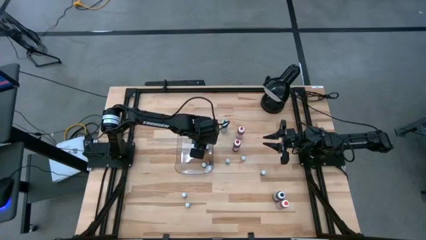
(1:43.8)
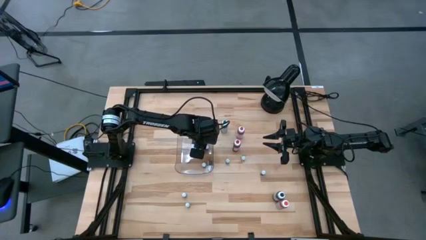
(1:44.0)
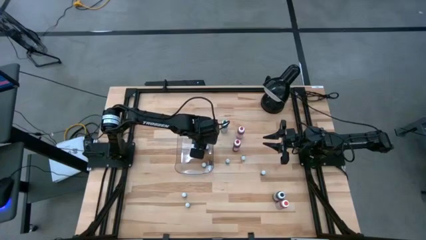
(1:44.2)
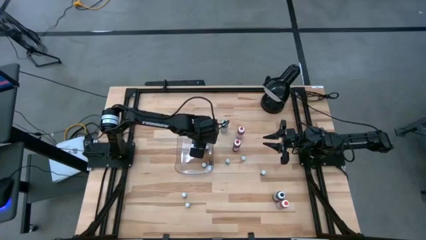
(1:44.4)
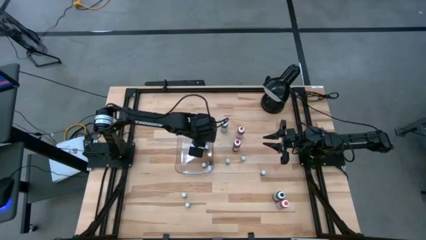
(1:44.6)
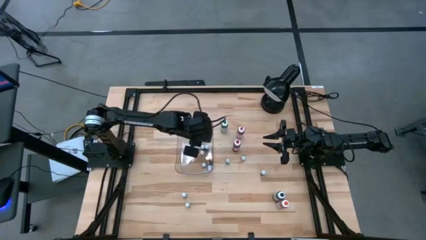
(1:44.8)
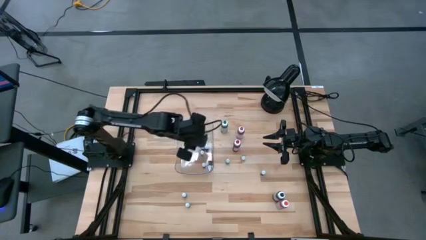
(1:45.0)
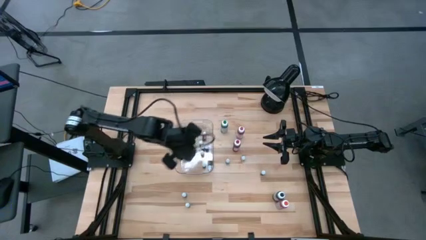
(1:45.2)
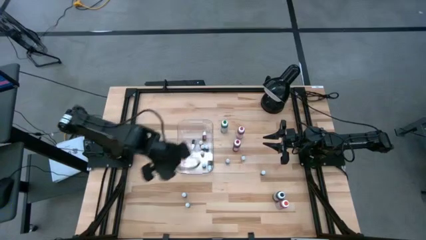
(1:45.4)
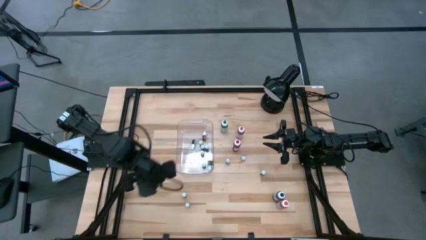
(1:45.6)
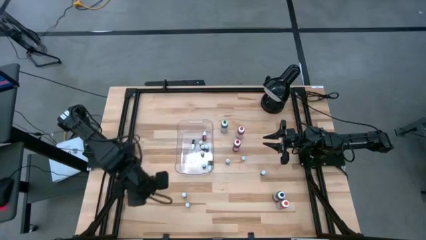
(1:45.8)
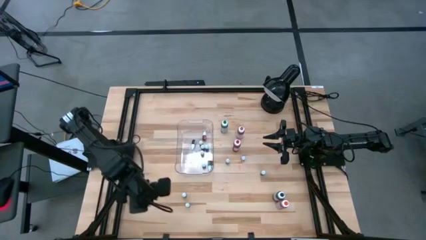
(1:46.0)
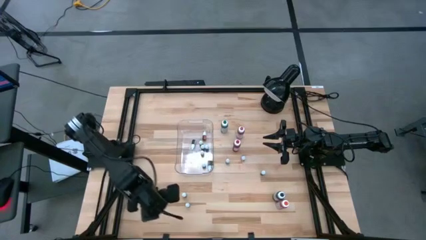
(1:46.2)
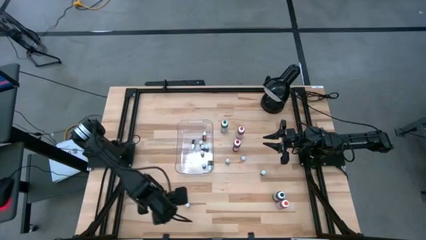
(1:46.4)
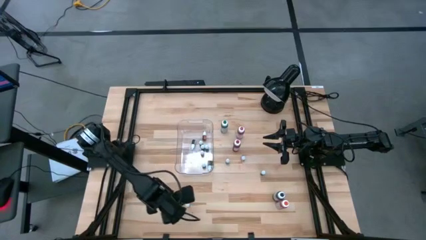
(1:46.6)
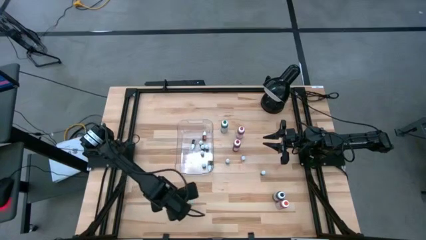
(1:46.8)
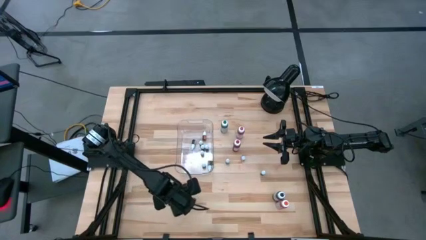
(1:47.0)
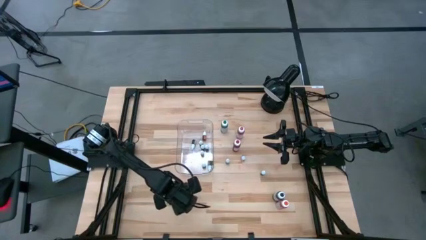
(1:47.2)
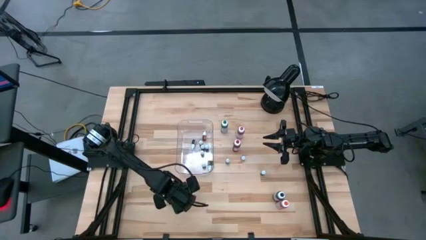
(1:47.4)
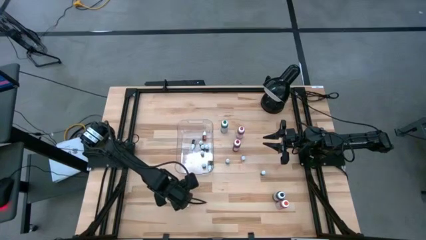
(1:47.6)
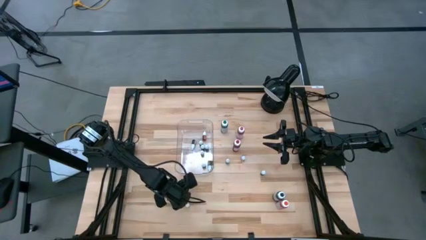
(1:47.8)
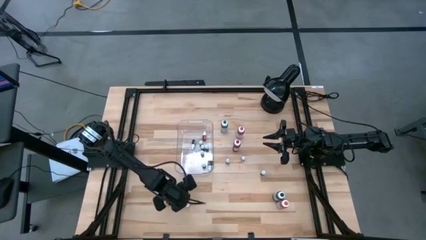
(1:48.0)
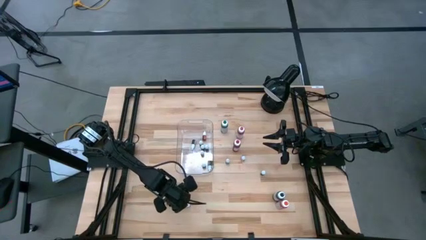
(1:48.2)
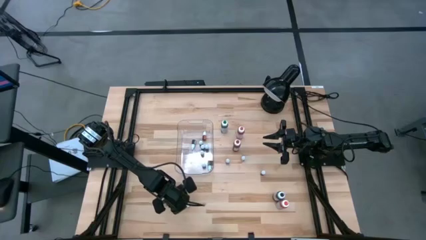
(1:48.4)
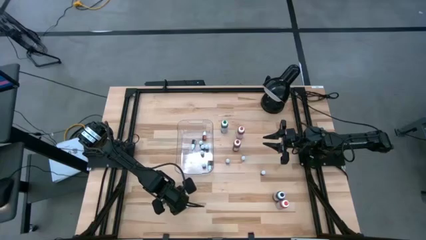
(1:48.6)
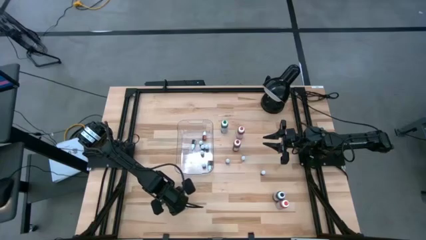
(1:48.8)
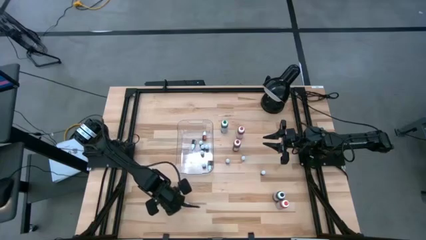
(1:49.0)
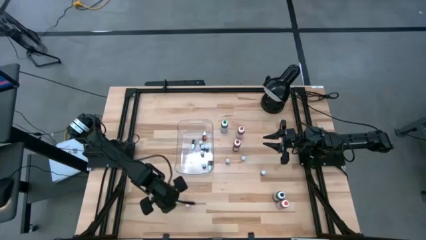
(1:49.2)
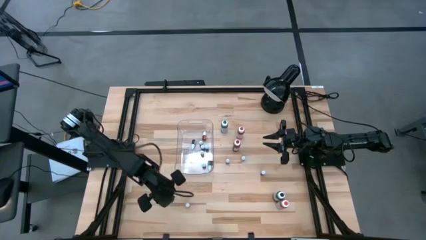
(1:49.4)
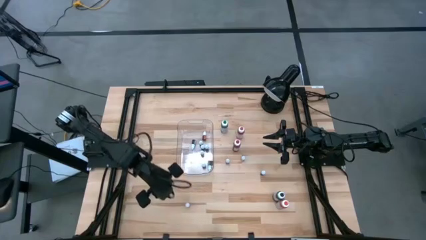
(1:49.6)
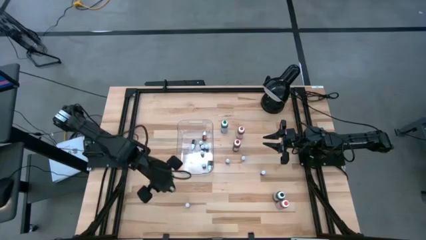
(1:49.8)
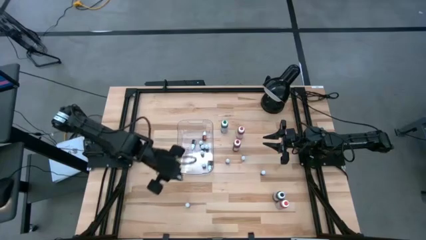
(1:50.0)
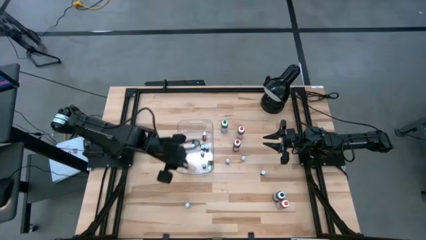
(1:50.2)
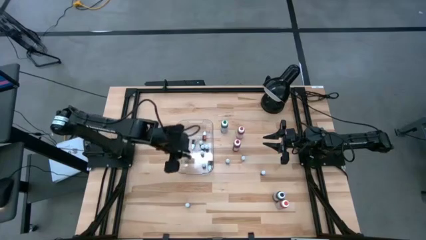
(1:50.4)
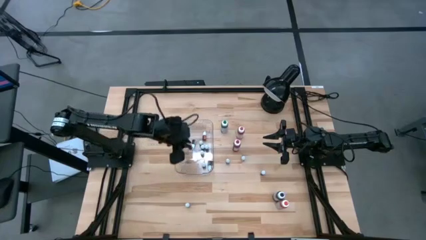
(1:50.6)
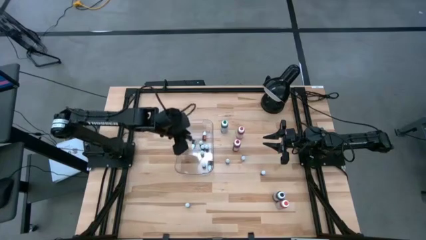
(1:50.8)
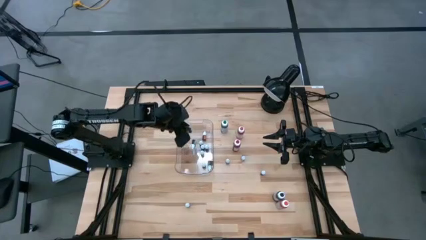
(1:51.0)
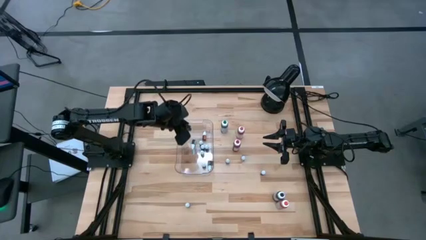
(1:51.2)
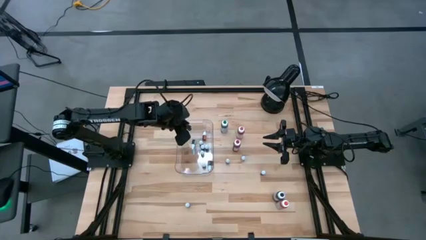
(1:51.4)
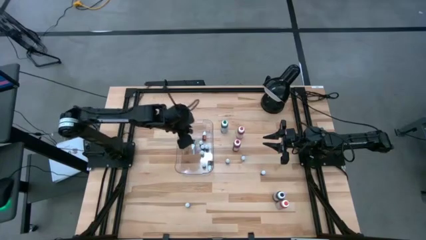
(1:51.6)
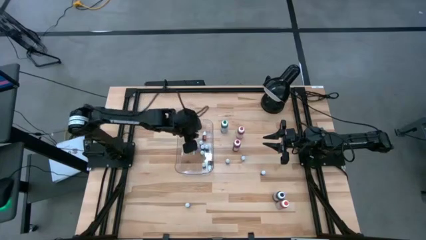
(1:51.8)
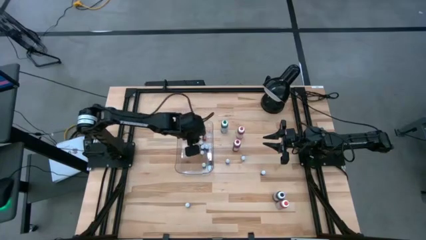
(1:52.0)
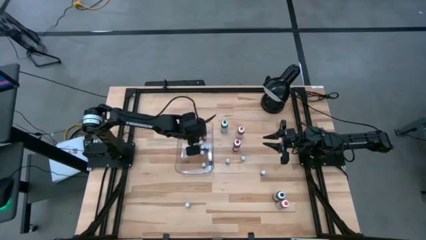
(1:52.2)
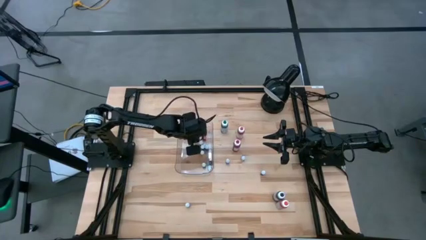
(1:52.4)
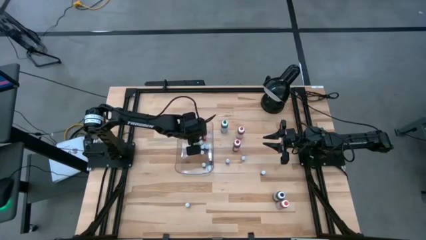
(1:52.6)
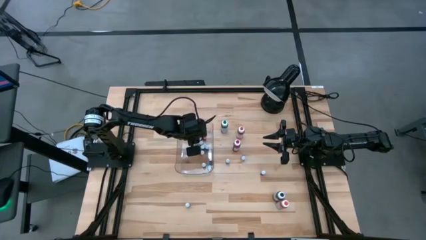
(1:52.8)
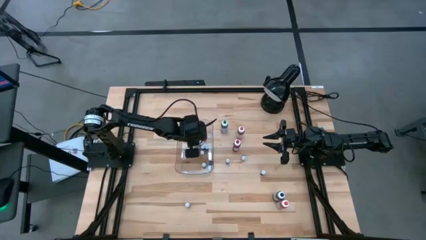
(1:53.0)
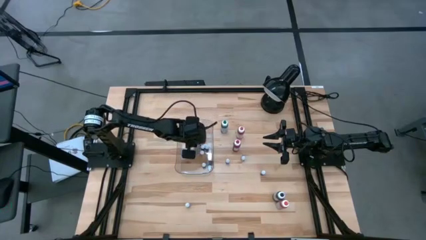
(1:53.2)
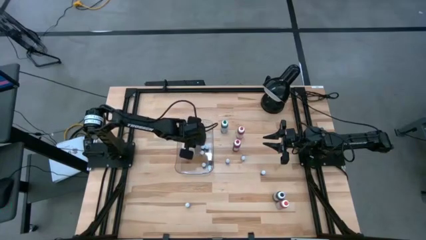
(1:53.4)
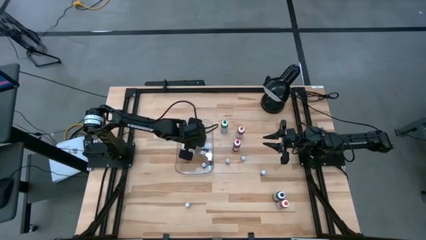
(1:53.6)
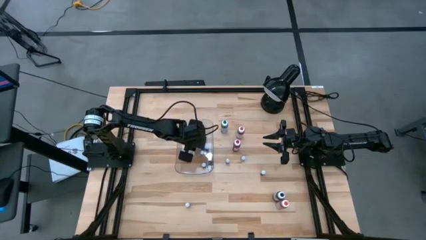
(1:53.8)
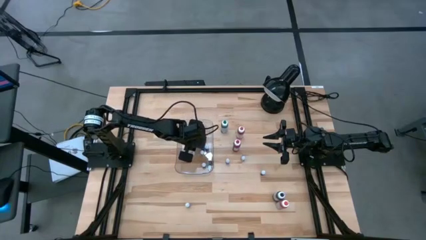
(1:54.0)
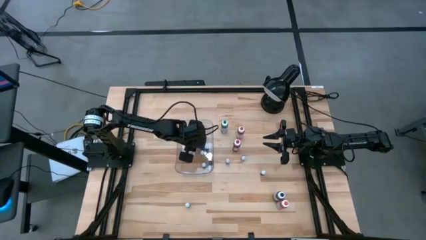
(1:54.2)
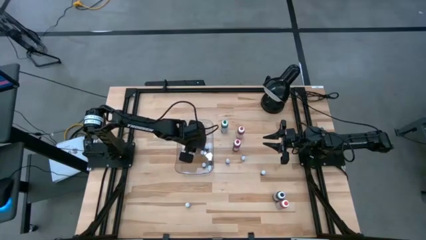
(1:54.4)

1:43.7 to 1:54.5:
Task: Pick & Place food coloring
Put the small green food coloring bottle into the transparent bin

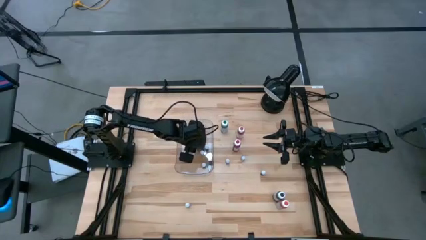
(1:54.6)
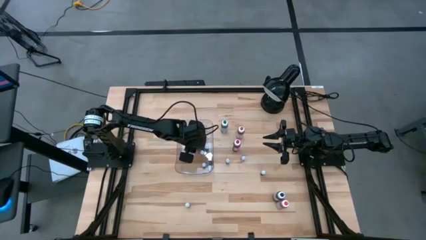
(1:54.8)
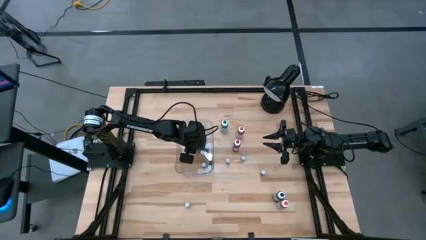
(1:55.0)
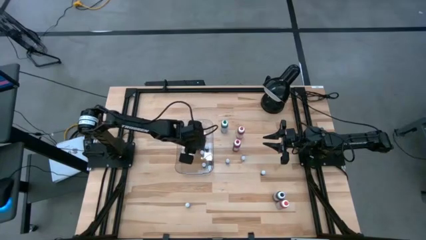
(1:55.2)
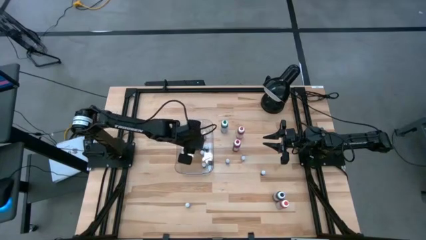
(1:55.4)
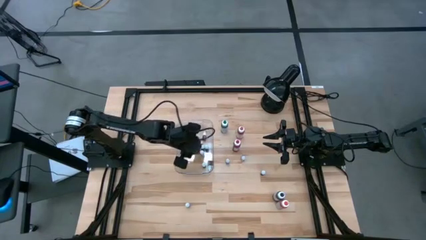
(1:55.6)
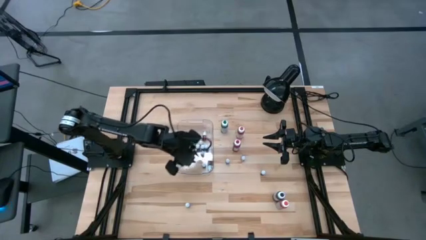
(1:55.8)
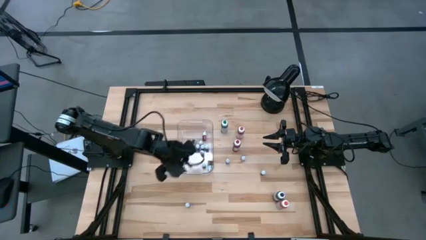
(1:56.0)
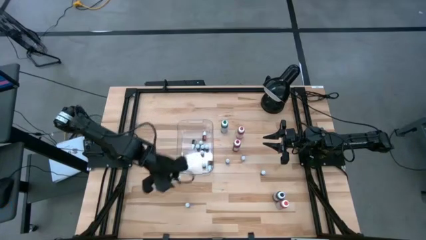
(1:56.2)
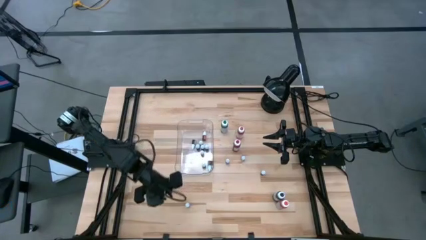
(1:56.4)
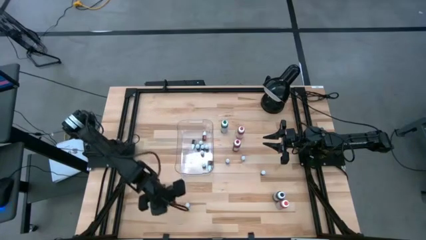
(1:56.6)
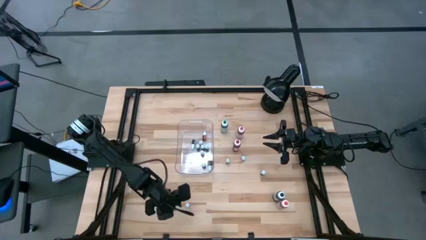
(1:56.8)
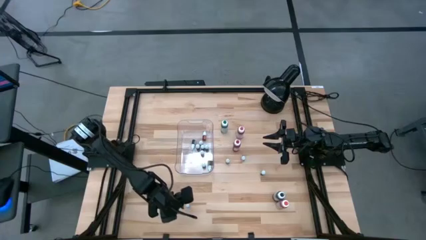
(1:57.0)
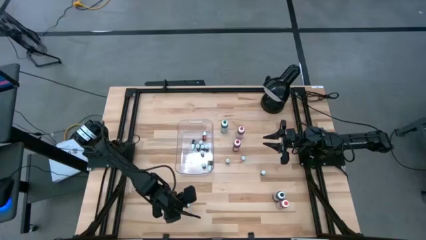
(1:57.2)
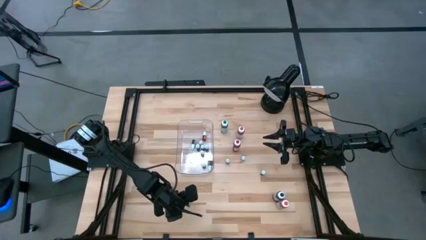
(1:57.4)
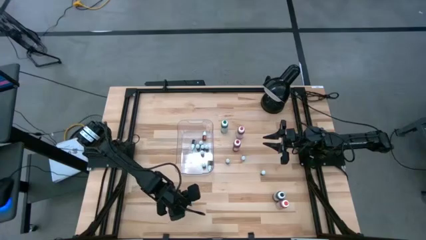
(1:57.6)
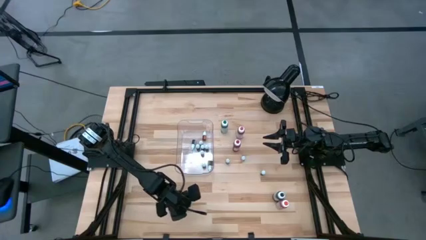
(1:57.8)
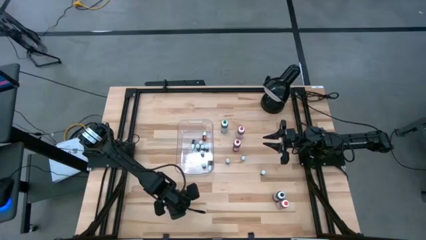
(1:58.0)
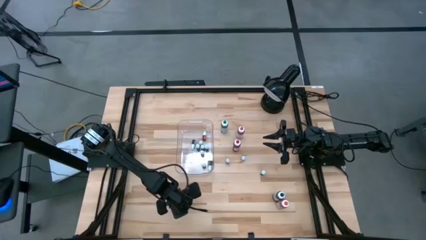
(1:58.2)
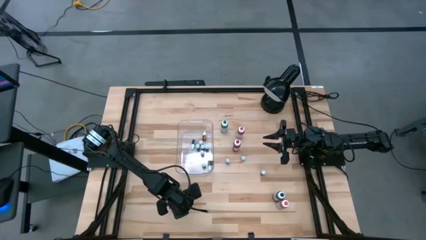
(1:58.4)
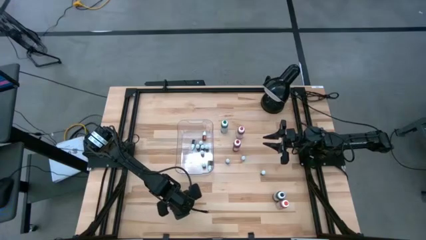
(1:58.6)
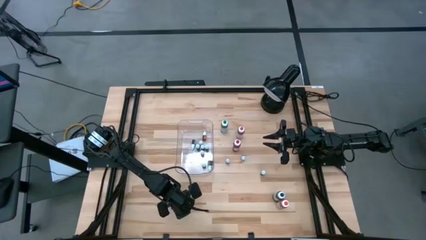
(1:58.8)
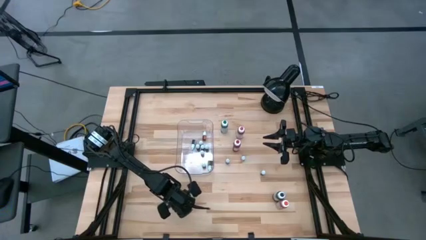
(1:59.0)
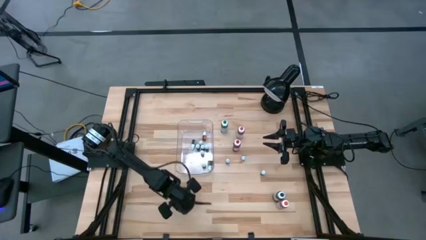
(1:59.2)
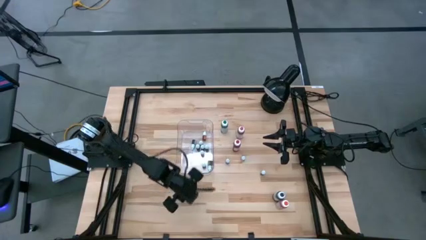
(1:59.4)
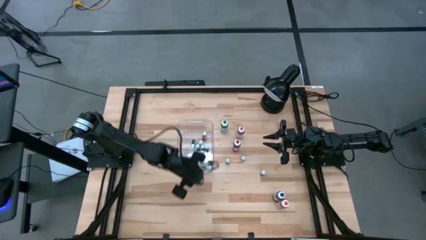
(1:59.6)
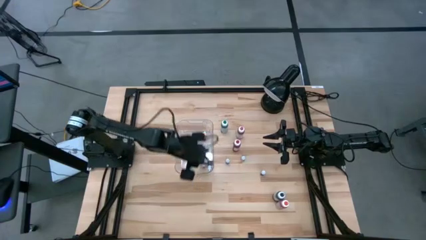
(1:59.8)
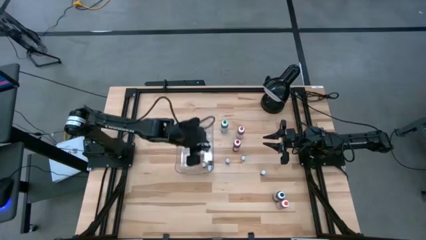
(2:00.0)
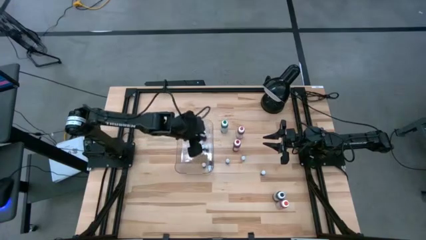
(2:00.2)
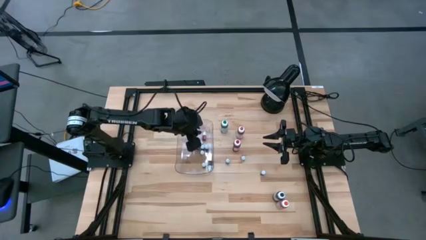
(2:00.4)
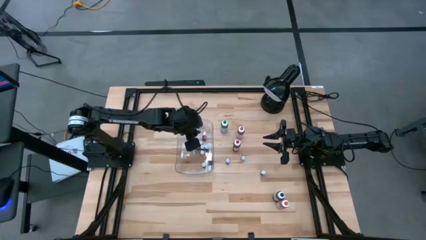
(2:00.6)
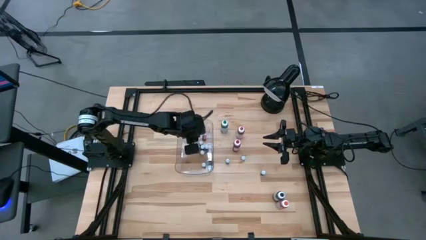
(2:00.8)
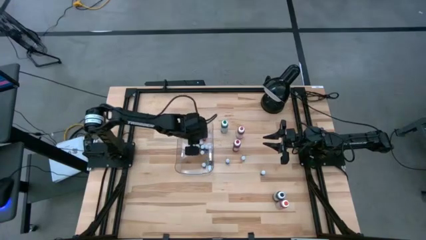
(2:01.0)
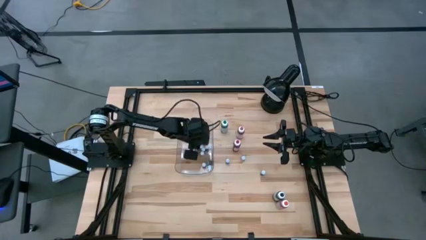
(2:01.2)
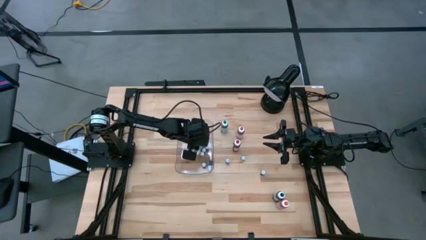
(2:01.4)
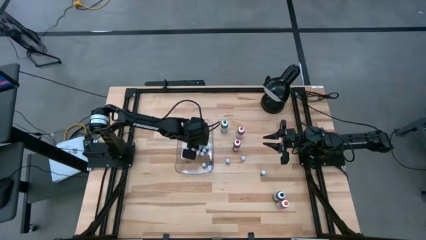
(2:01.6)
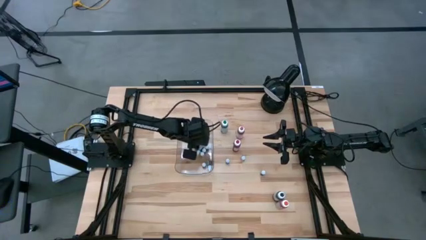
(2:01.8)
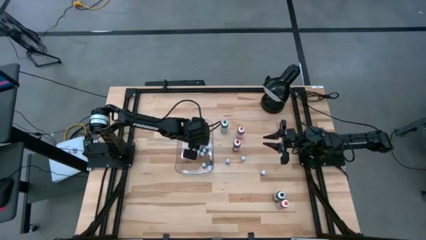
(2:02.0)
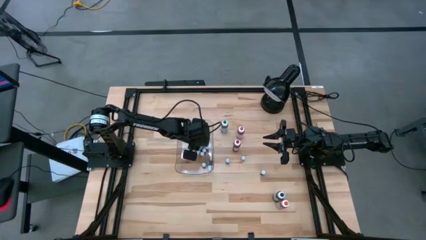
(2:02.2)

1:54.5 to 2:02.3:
Put the bottom small red food coloring bottle into the transparent bin
